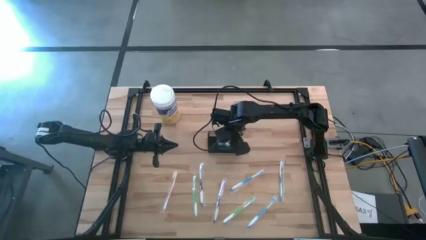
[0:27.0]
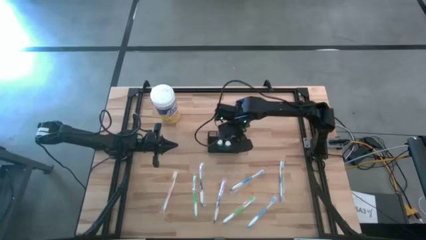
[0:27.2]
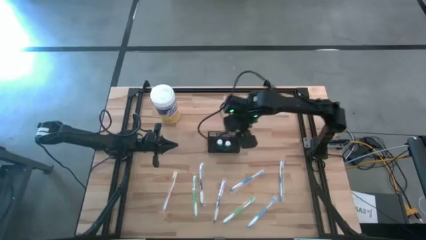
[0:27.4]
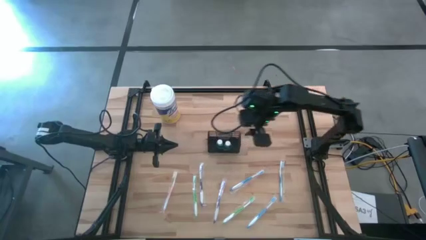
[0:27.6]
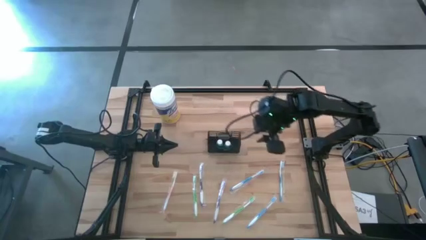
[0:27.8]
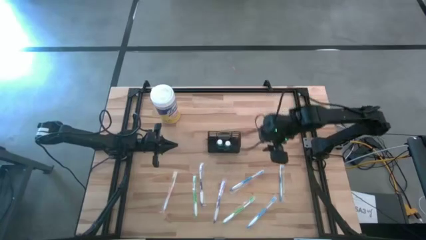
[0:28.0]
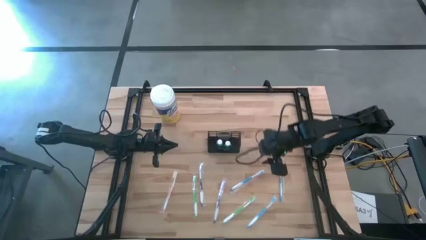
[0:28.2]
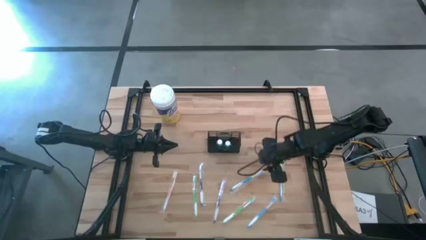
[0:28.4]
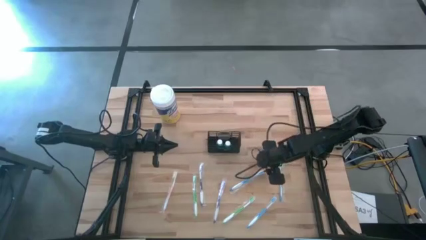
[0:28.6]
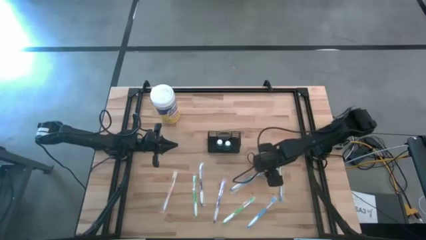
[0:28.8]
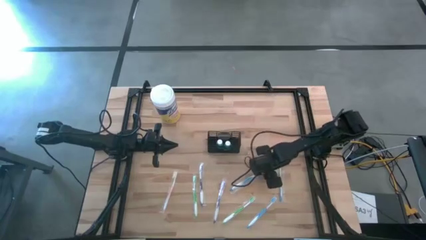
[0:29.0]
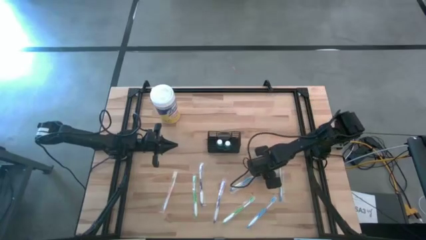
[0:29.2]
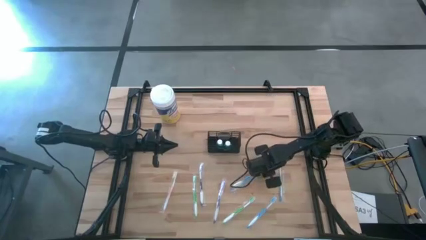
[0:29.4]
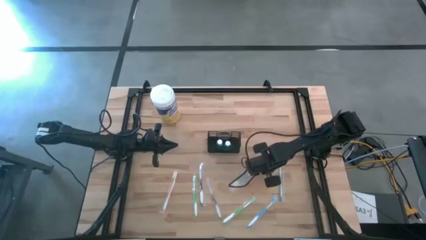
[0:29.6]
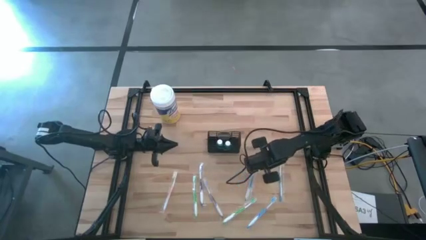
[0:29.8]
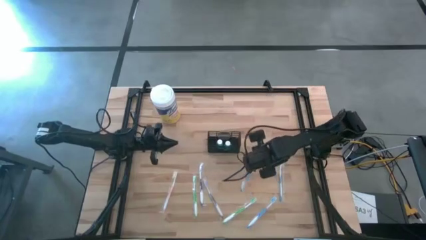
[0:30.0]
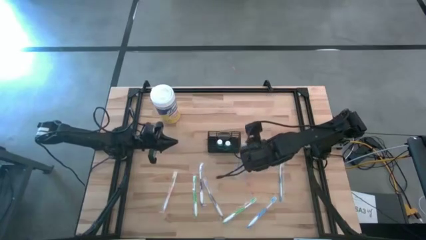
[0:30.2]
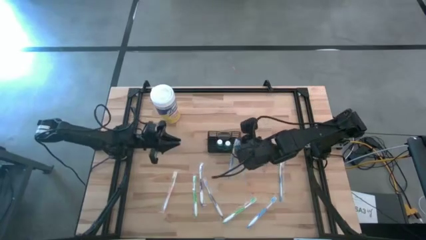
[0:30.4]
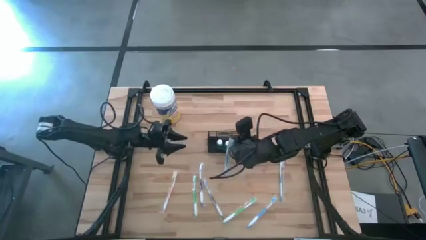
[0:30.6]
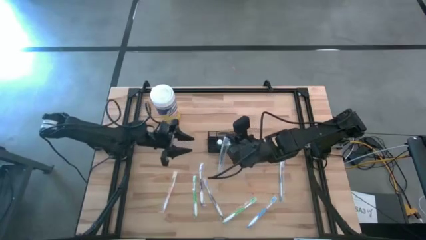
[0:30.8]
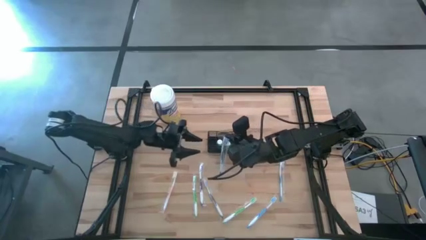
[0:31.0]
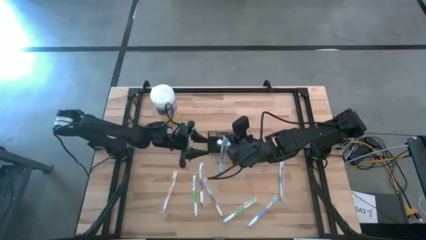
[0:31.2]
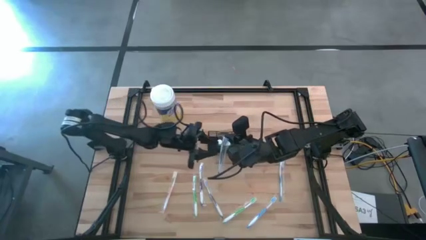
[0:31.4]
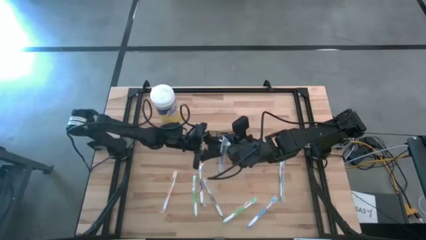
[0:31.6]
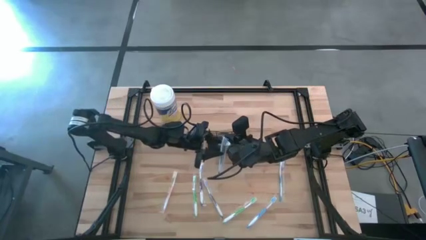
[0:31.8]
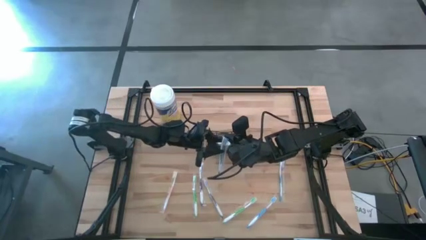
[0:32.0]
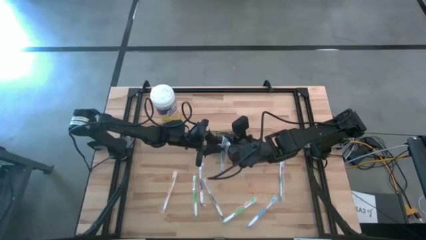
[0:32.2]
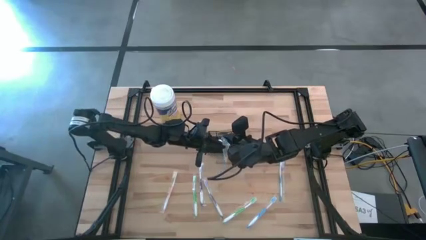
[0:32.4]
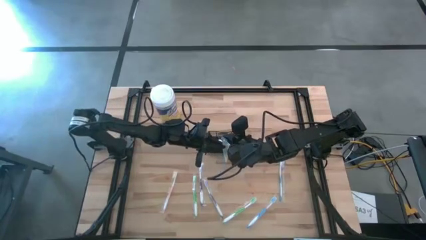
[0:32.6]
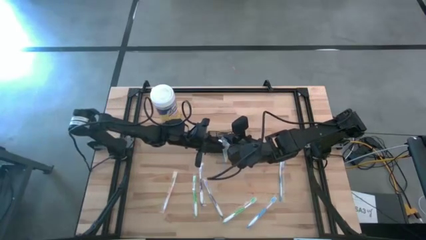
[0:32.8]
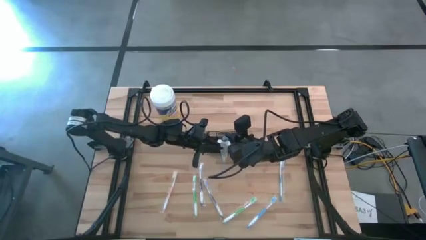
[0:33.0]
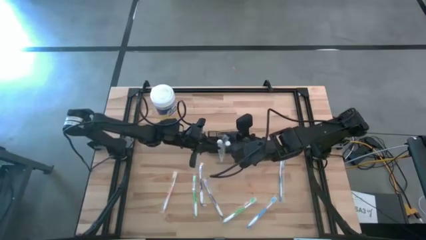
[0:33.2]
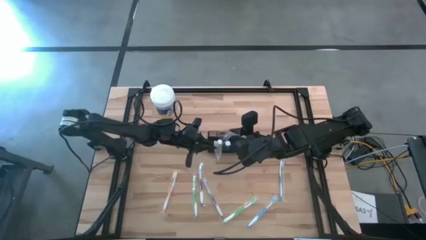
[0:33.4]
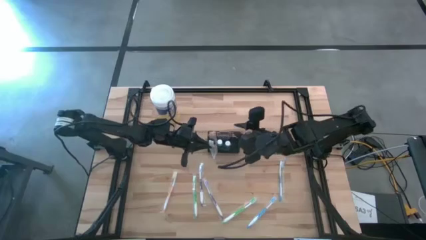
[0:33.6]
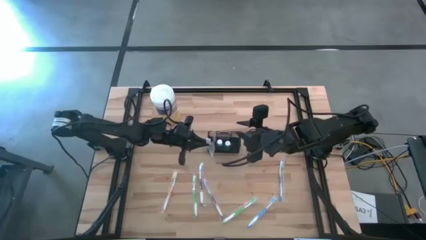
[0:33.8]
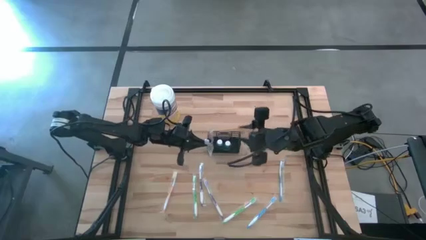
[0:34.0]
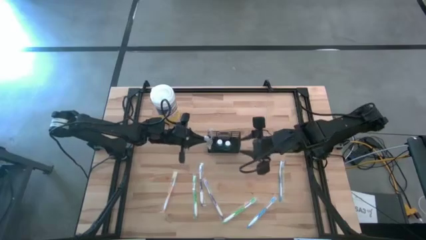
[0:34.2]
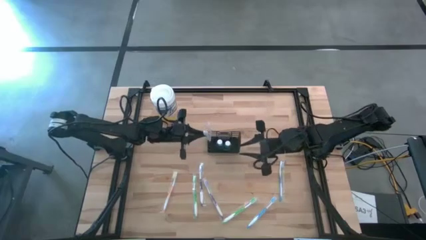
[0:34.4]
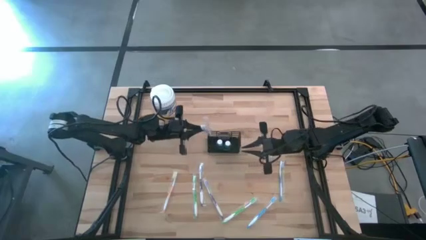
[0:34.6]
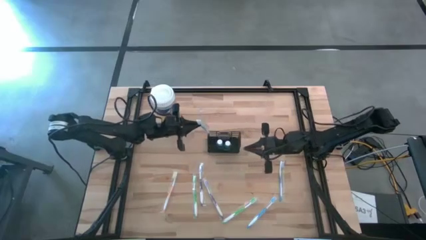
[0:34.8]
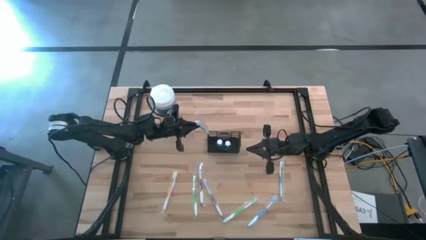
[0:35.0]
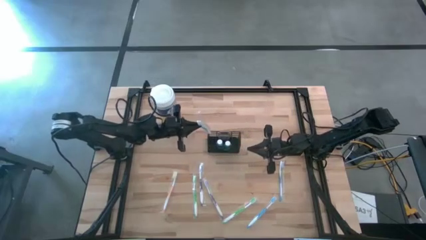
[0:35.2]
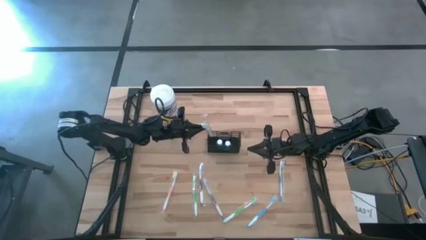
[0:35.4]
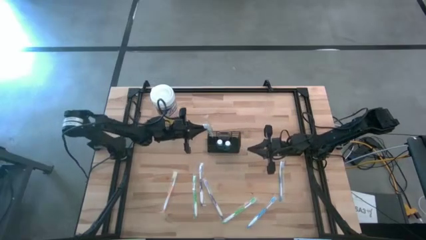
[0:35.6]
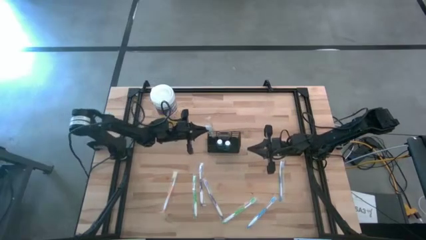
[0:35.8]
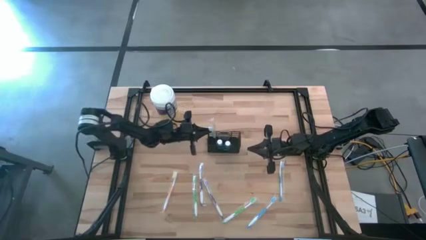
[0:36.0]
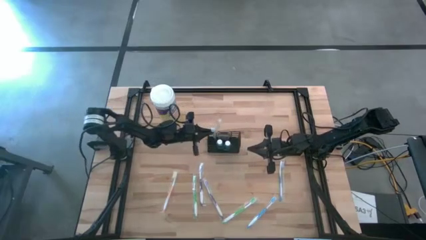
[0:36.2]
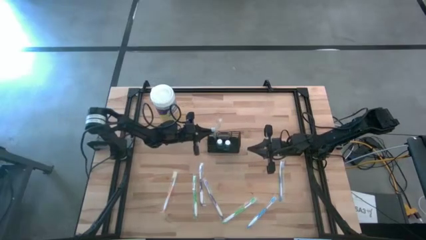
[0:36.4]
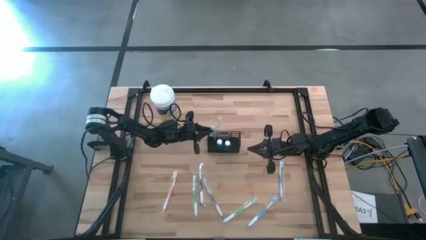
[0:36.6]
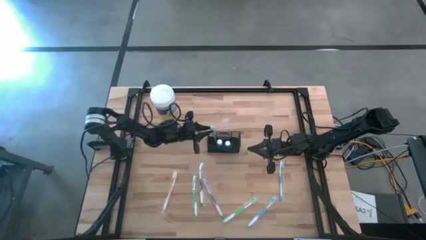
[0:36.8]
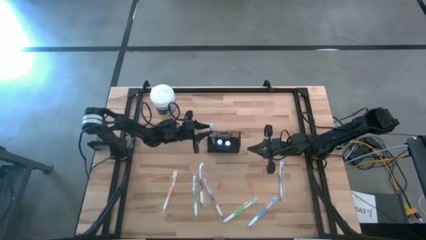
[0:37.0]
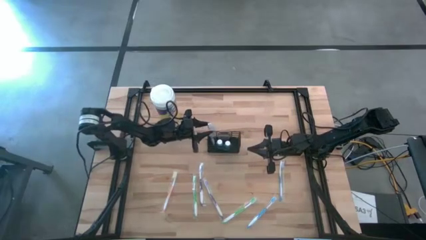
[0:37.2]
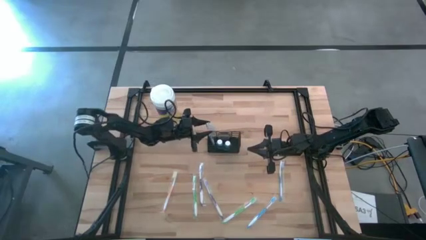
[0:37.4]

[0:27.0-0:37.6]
Task: Pick & Place toothbrushing station
Put the left blue toothbrush into the black mesh organizer
